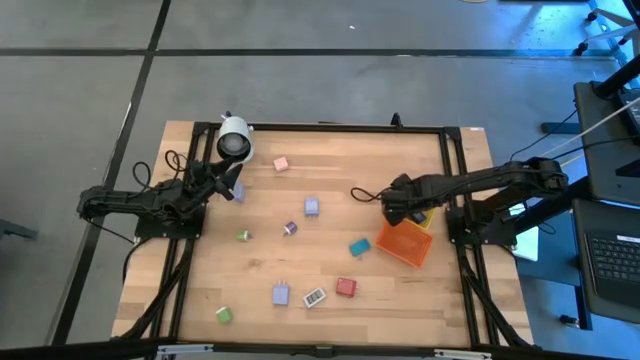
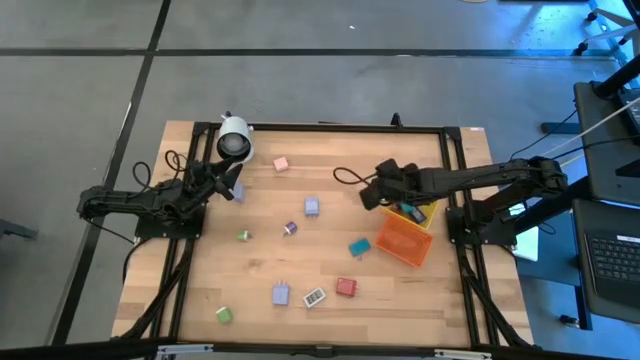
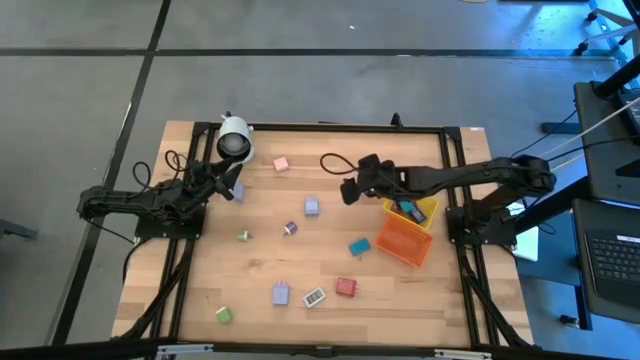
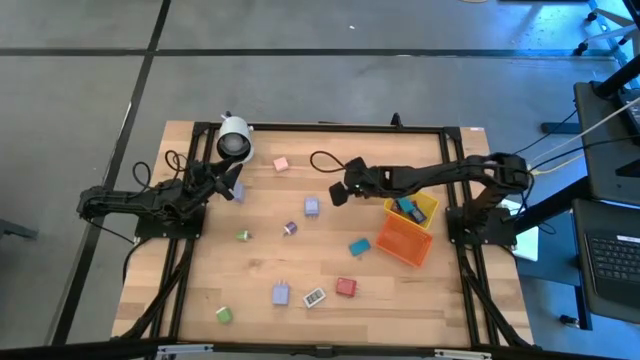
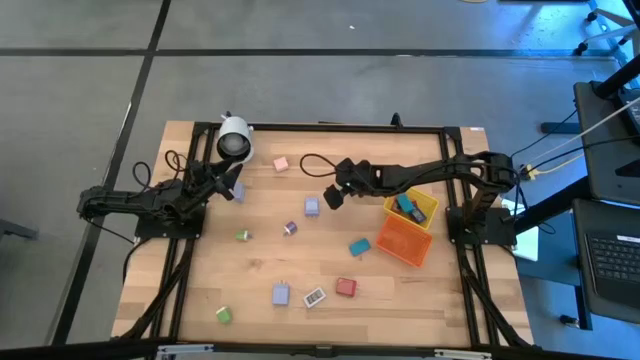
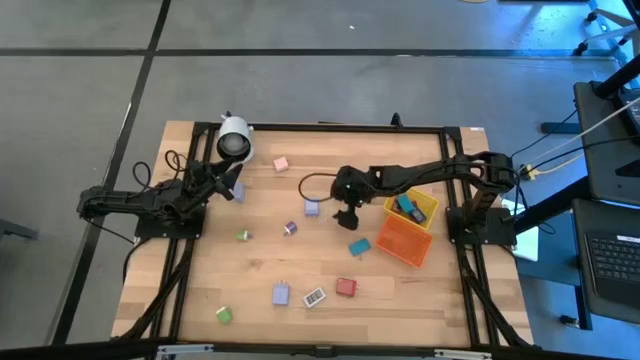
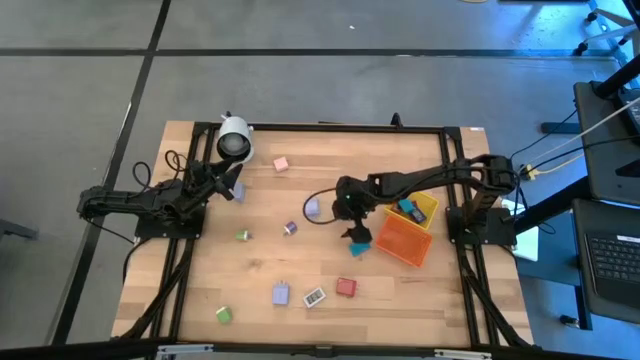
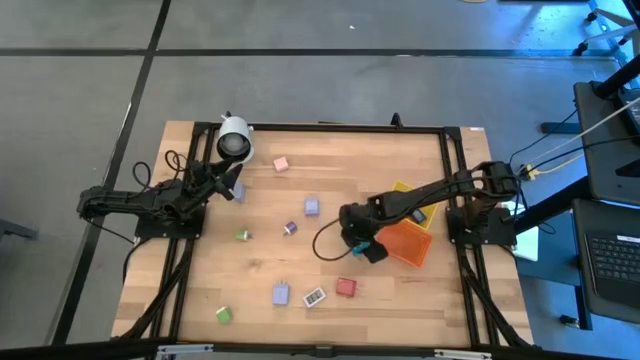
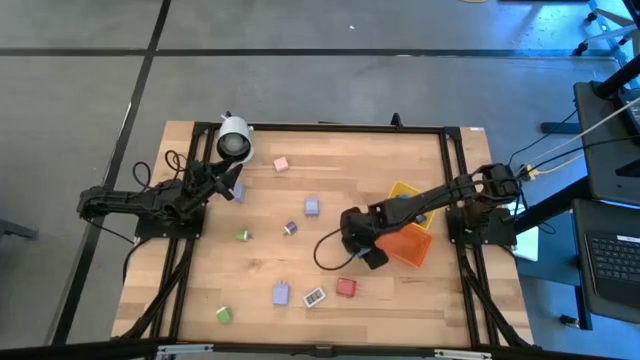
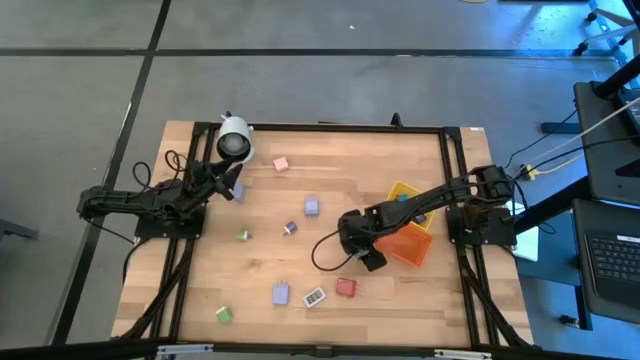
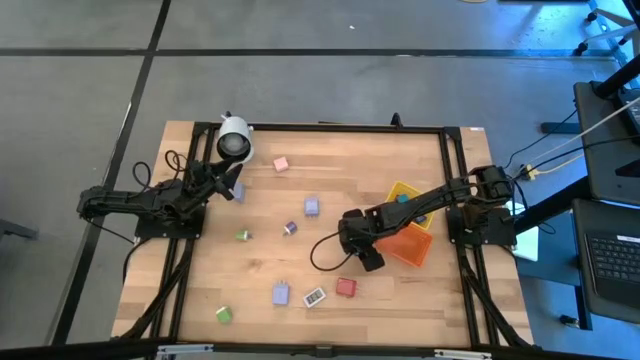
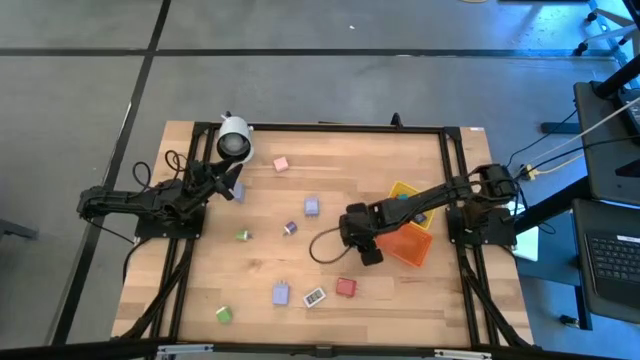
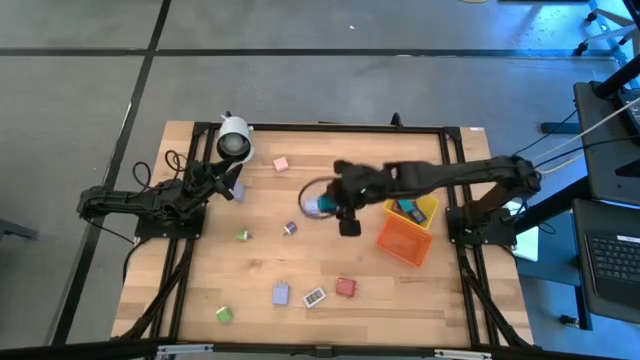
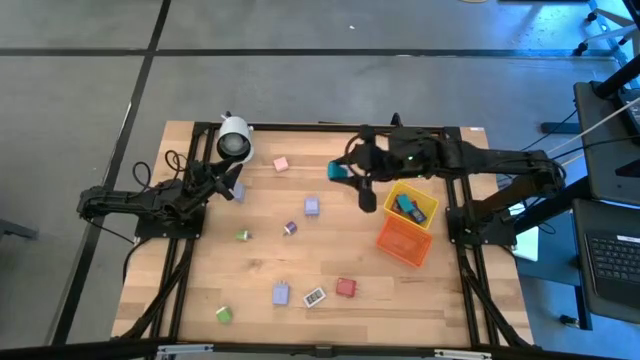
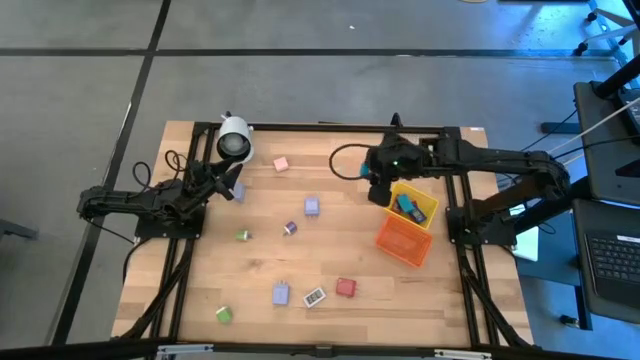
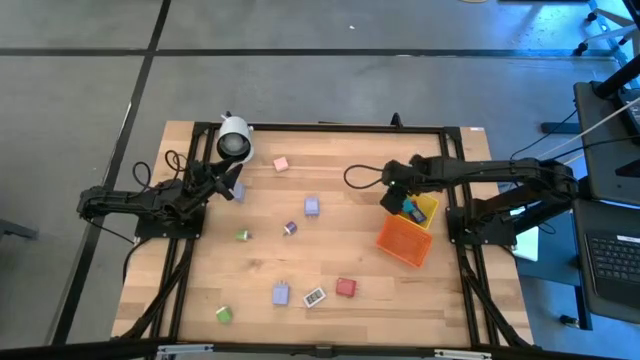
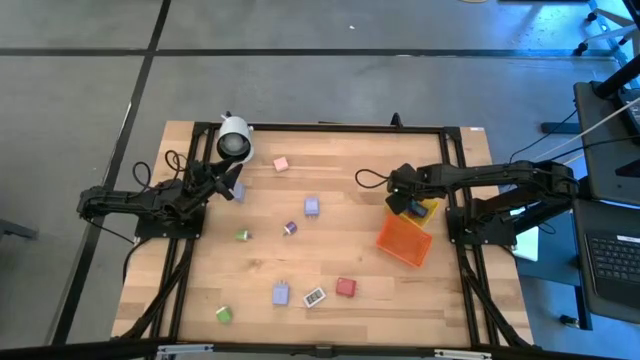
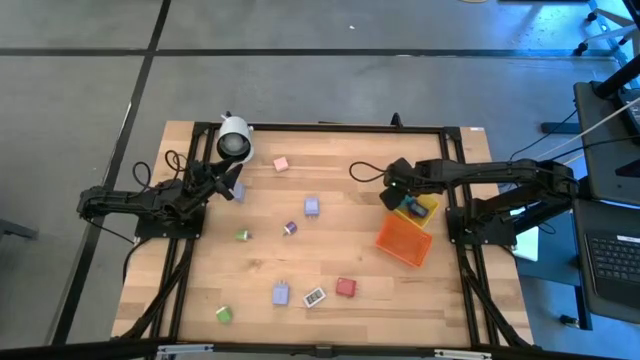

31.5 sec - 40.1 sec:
Task: Pick & Place Office items
Put the light blue digital timer into the yellow basket

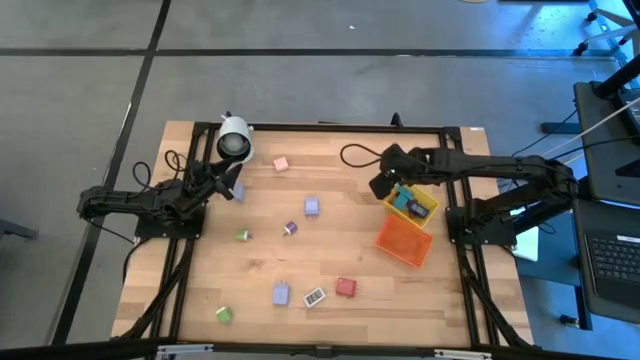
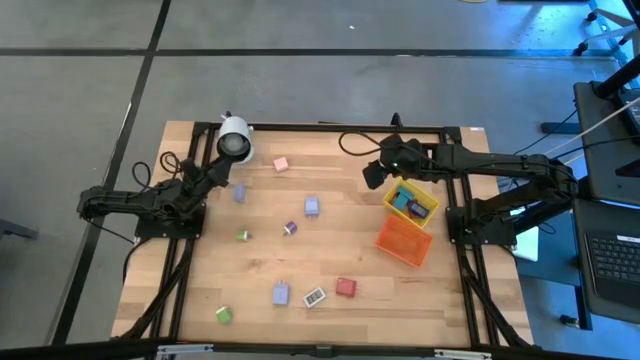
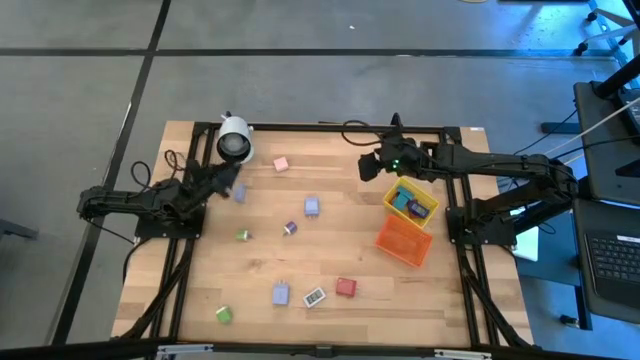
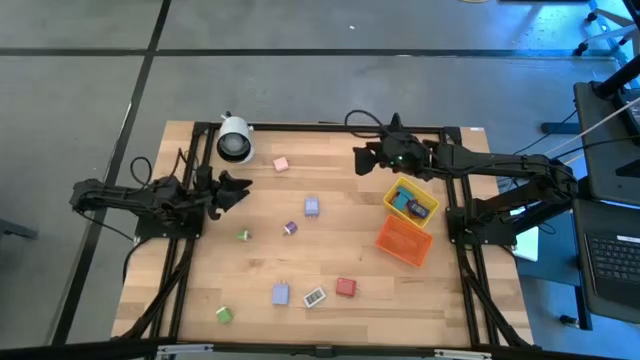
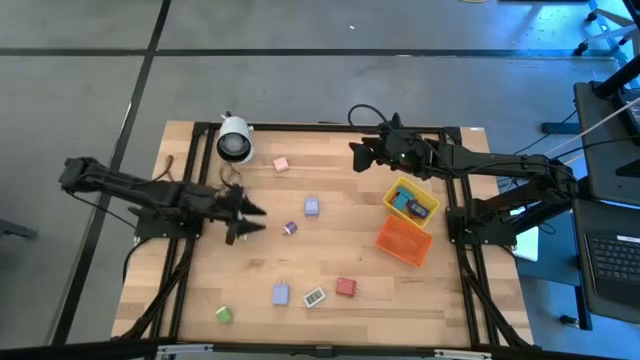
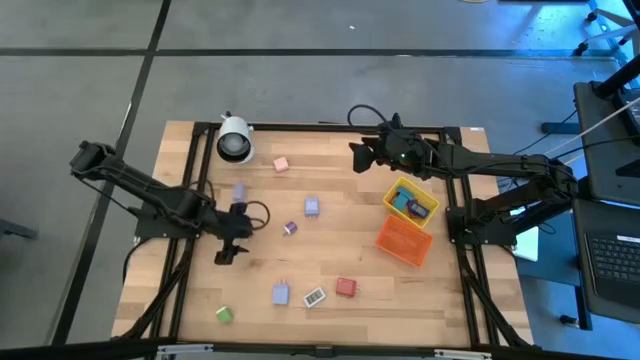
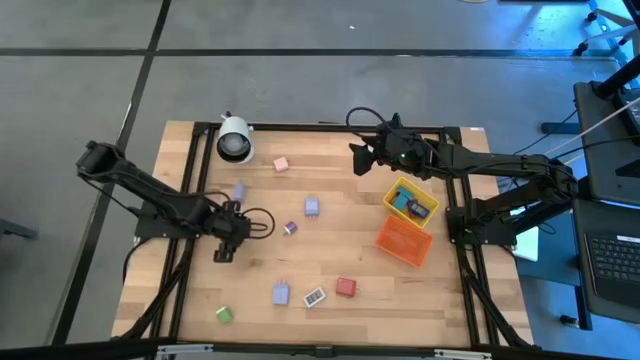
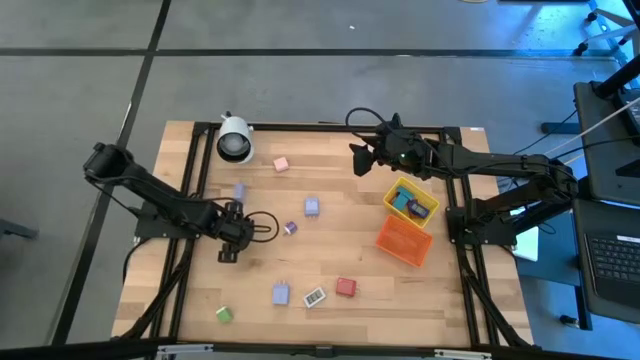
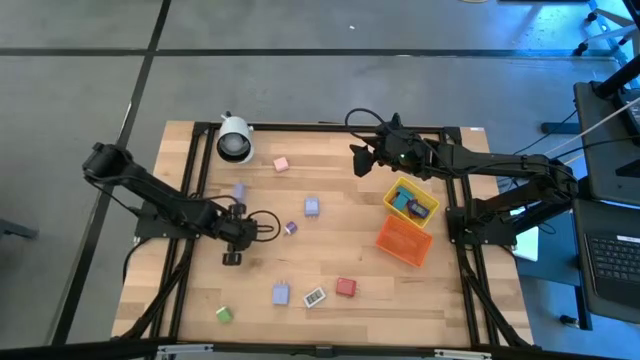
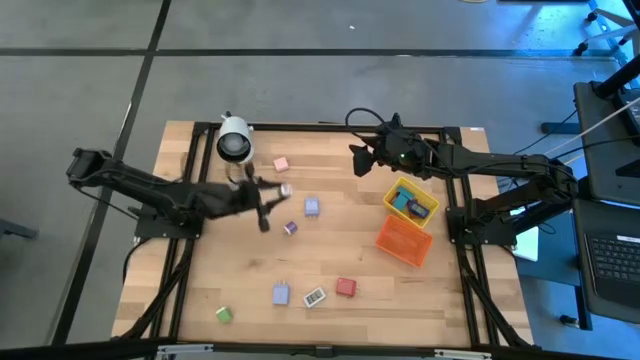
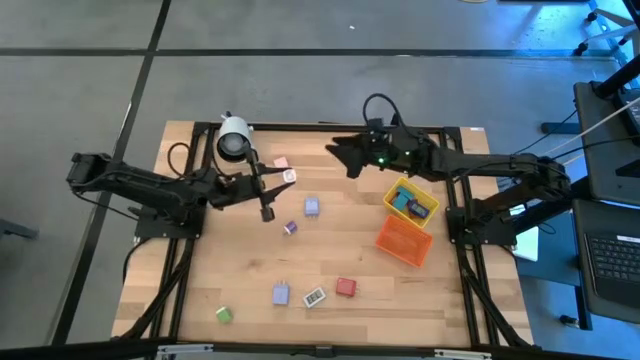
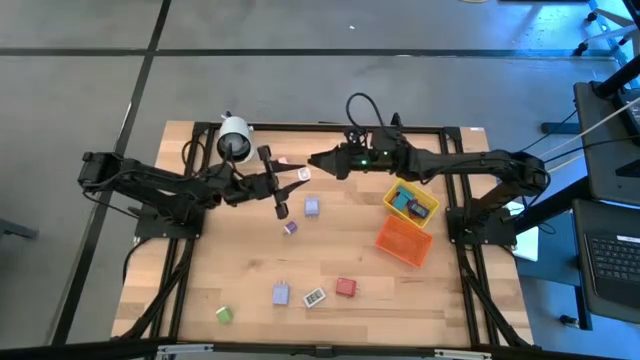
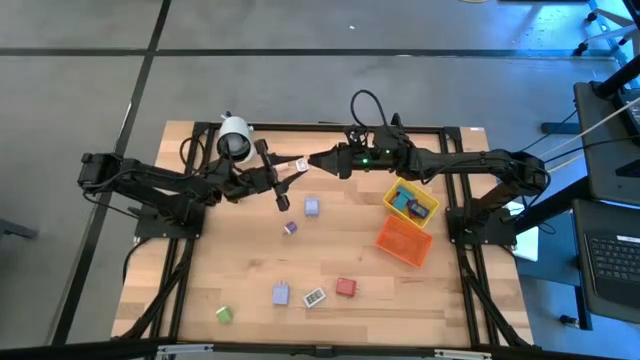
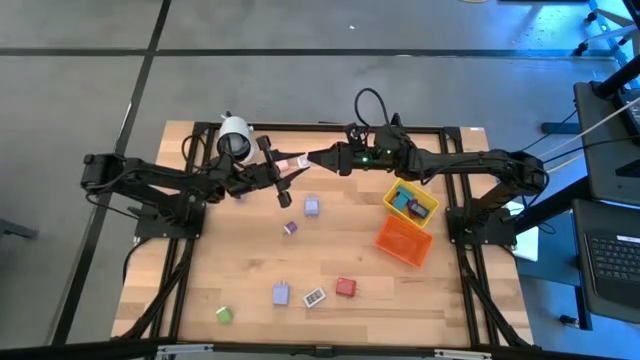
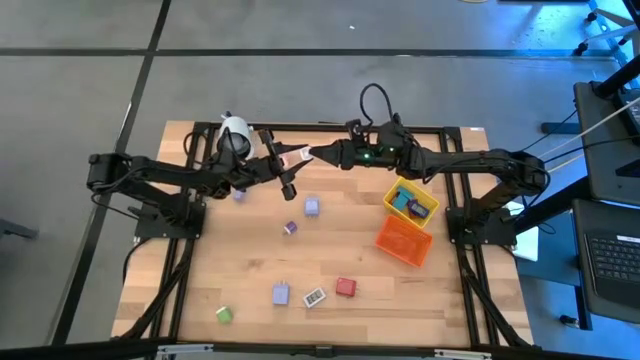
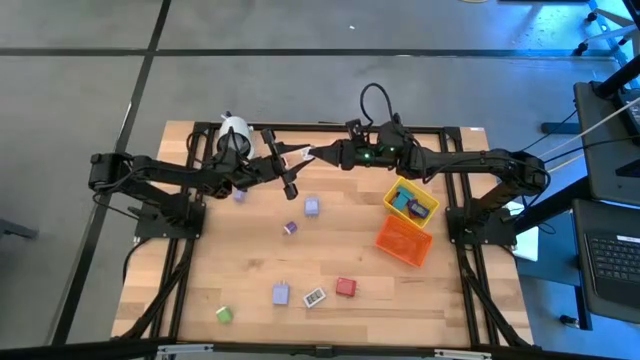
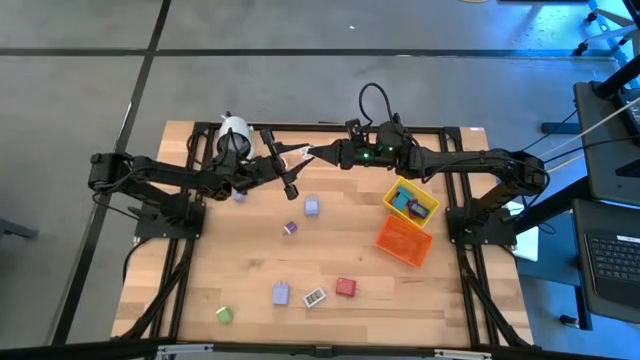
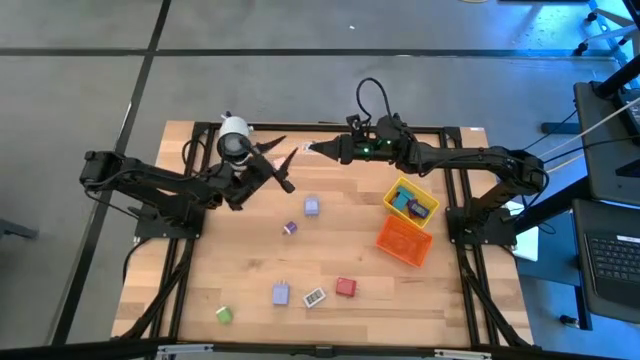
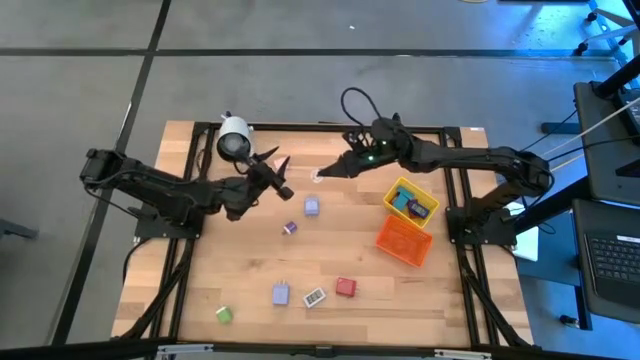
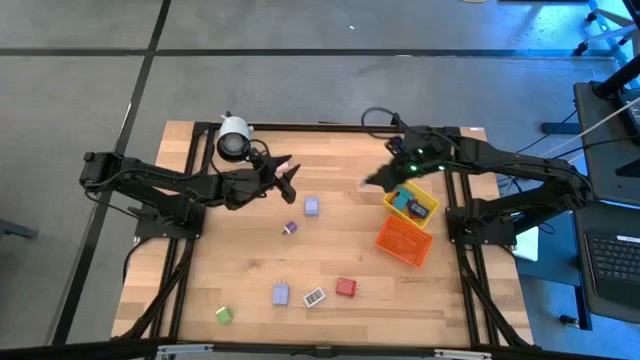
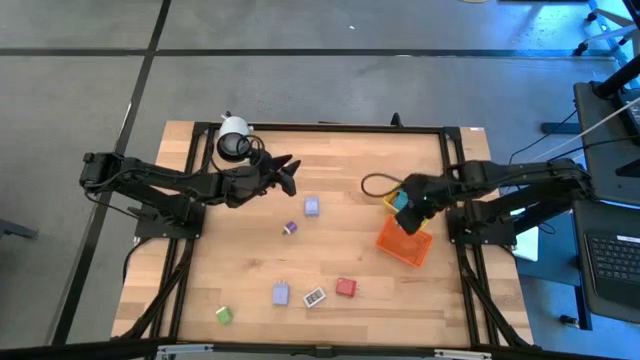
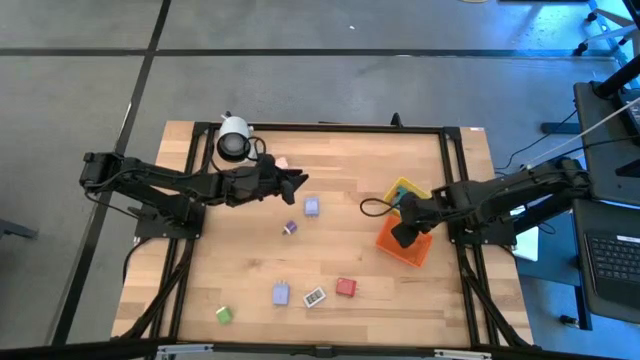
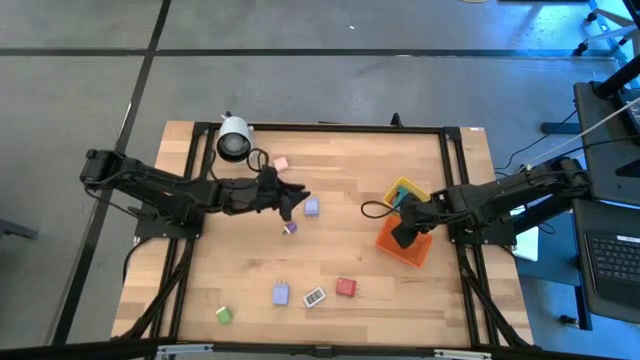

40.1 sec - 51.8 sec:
Put the top green charger adapter into the orange basket

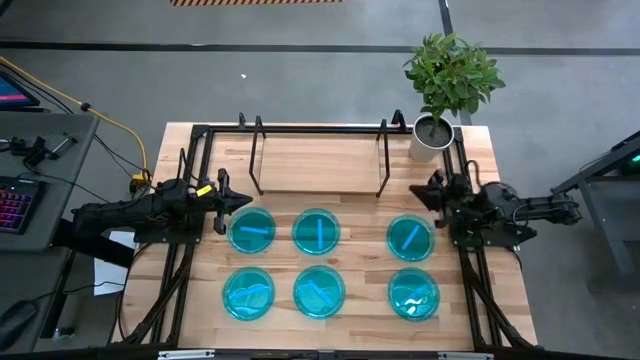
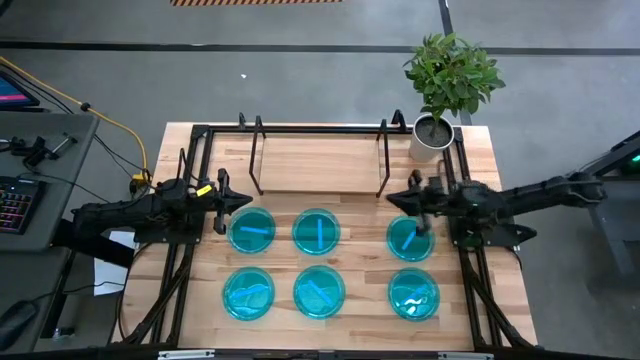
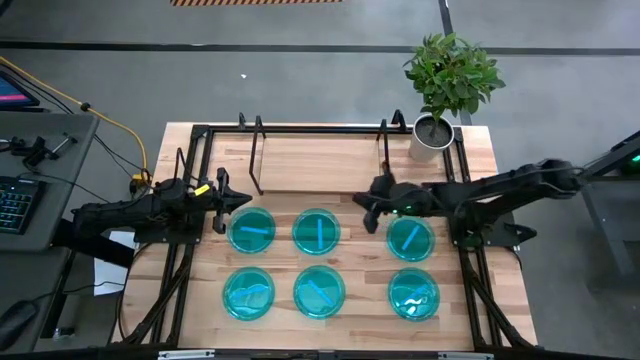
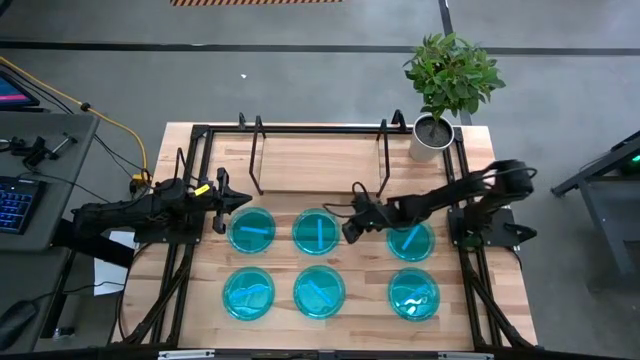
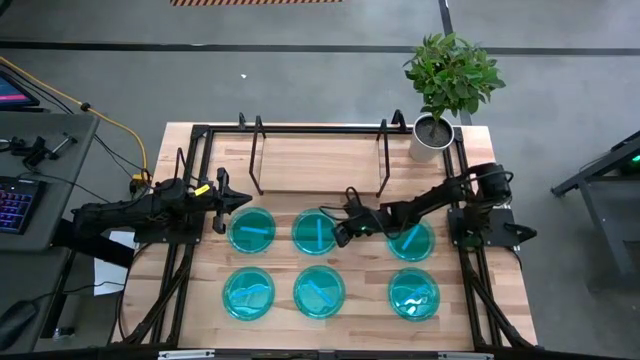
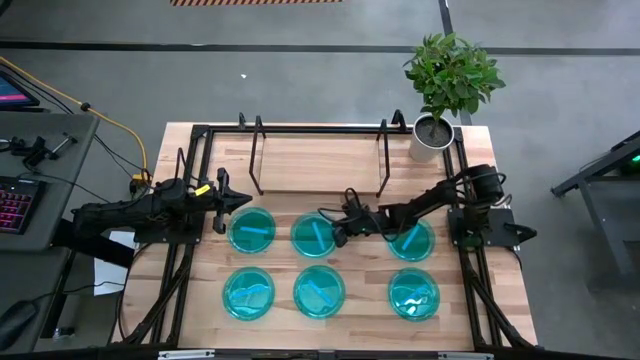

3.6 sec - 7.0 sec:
Task: Place and stack plates onto a shelf
Put the blue plate on the shelf
